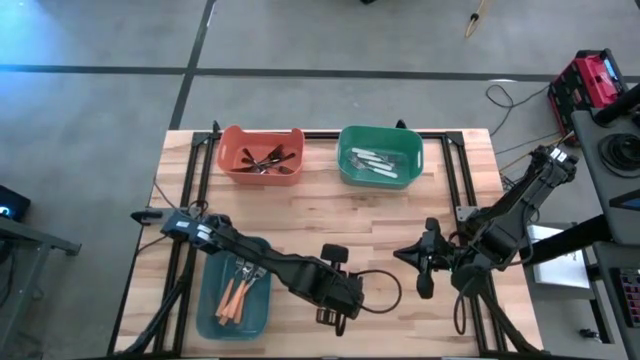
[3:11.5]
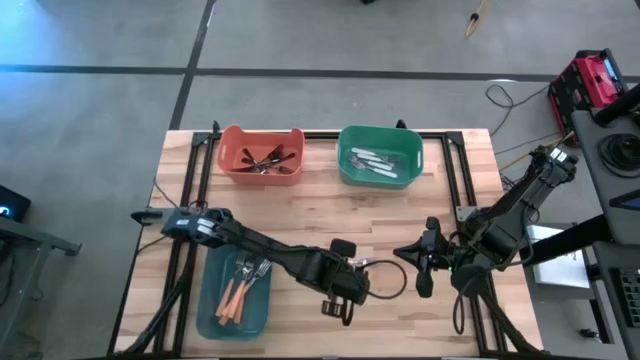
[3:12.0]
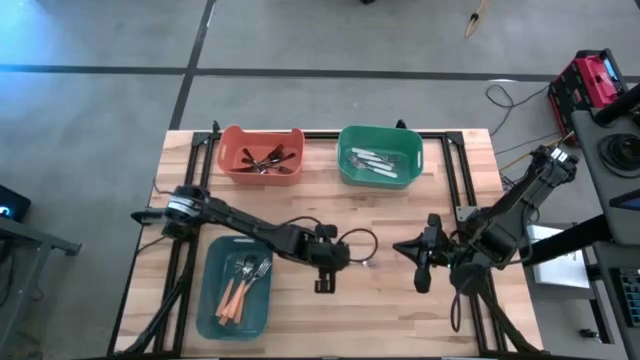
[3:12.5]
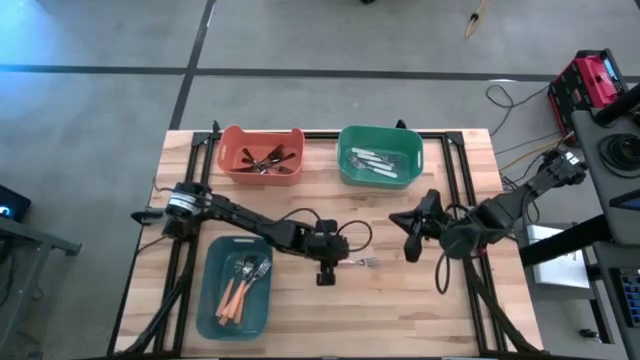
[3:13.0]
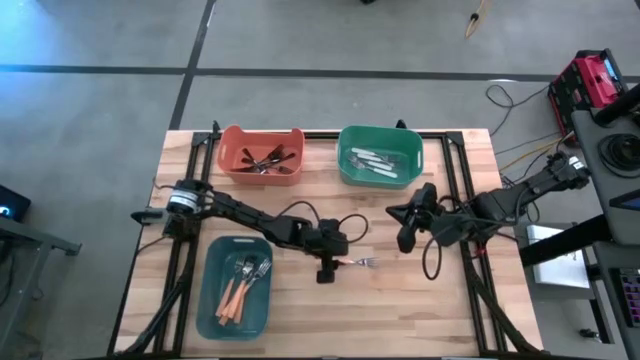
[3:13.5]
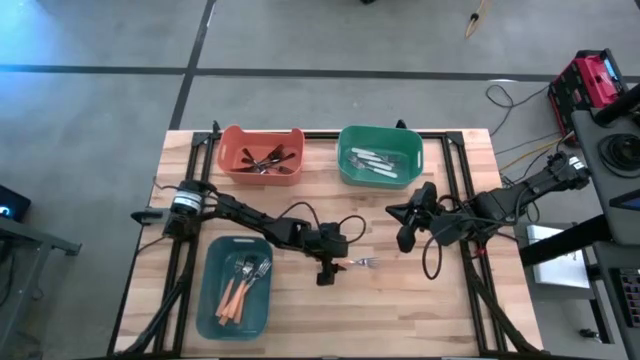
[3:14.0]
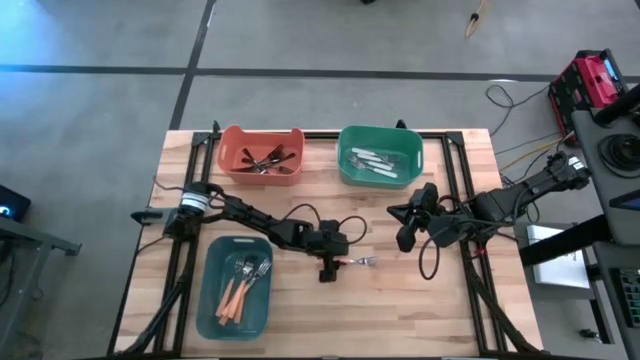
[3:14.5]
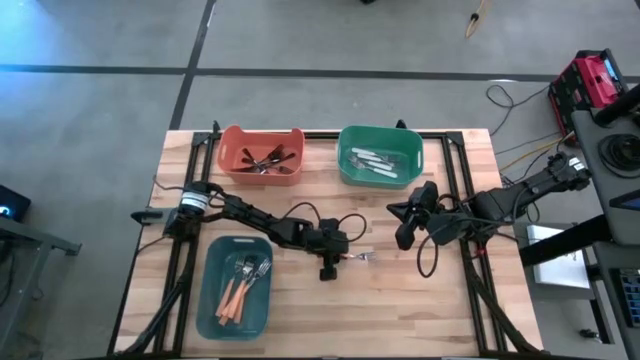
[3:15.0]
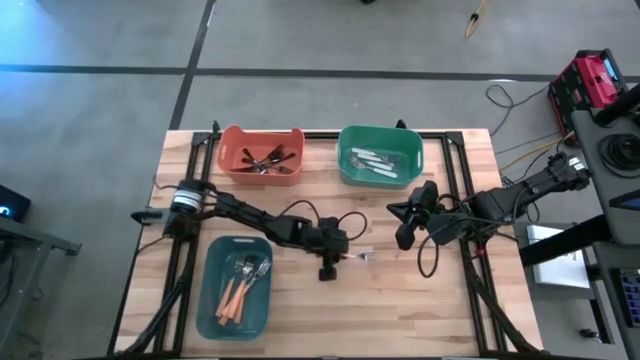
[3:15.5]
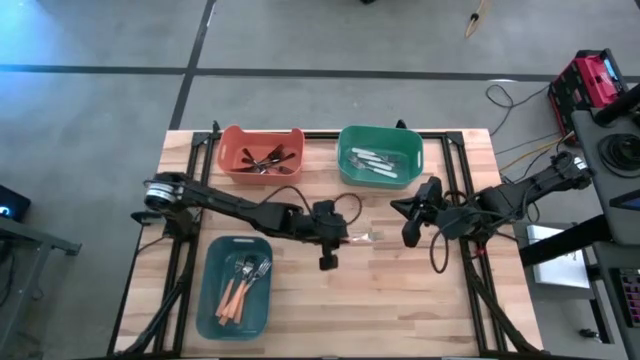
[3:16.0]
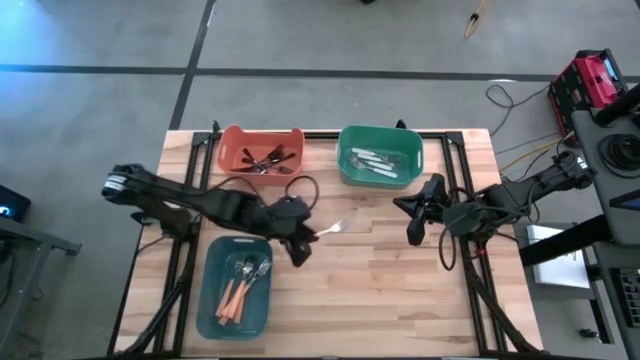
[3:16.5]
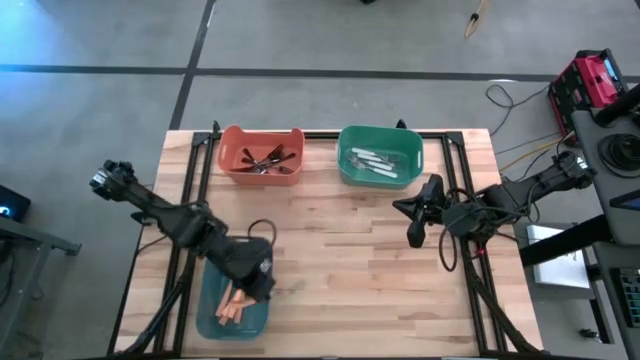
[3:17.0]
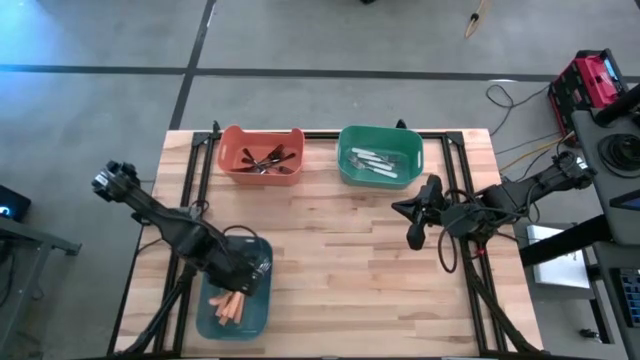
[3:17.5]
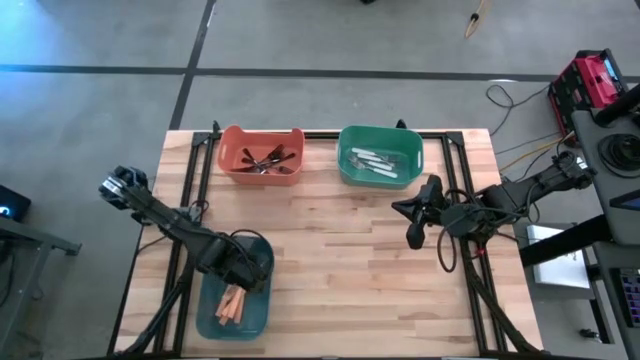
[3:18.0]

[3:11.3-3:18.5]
Task: Sort silverware by color (type)
Put the orange fork into the blue-green bin

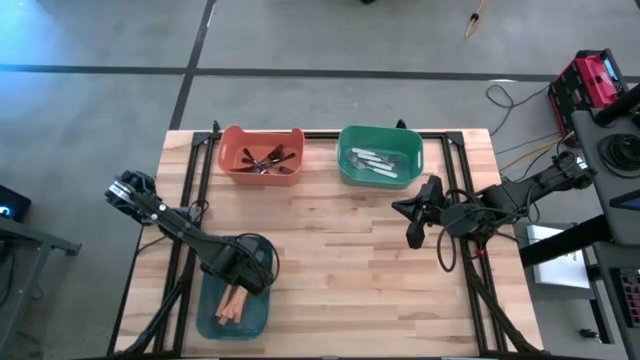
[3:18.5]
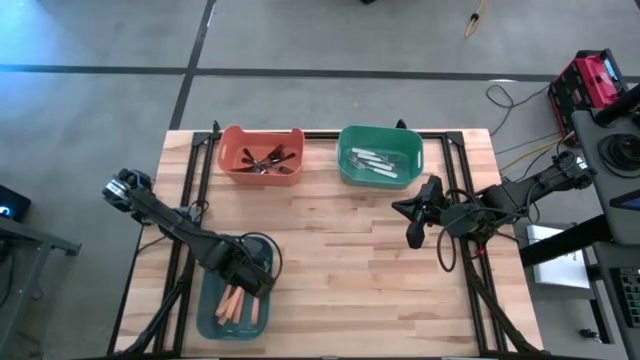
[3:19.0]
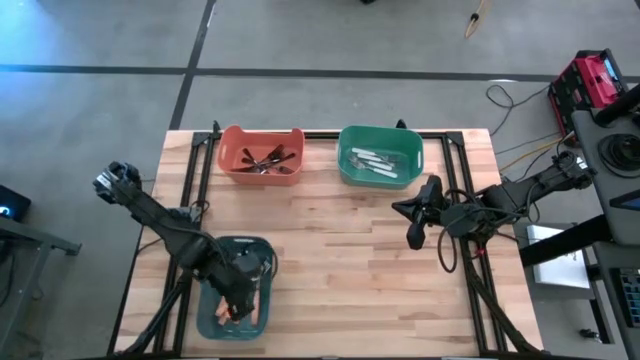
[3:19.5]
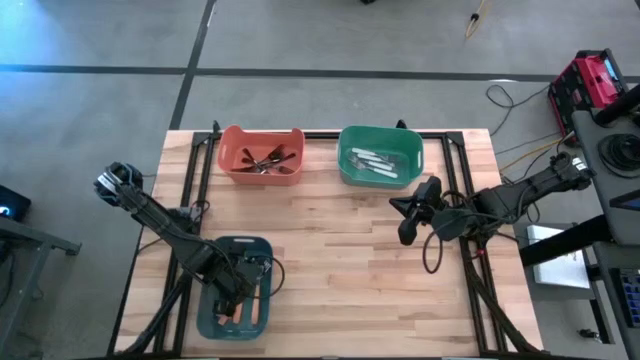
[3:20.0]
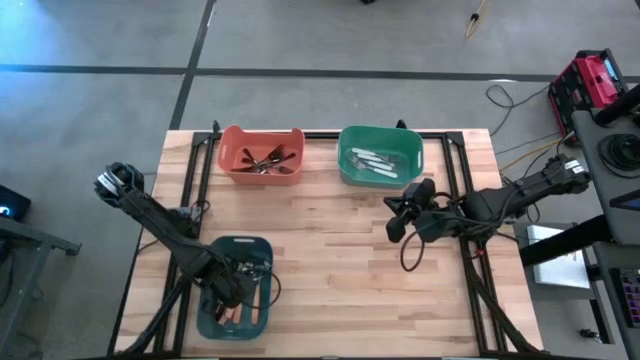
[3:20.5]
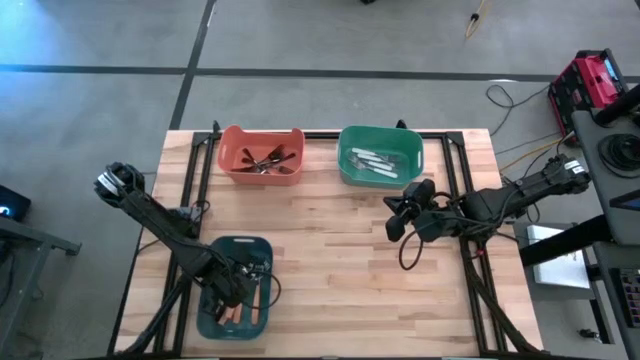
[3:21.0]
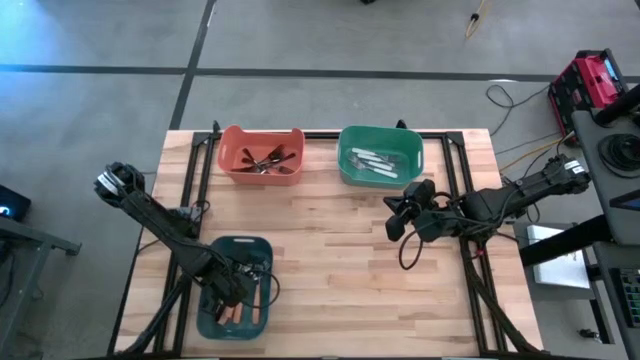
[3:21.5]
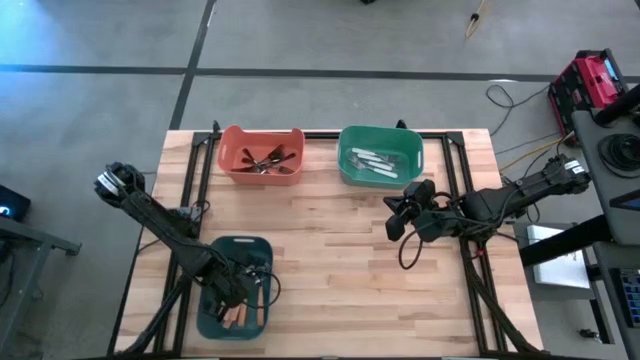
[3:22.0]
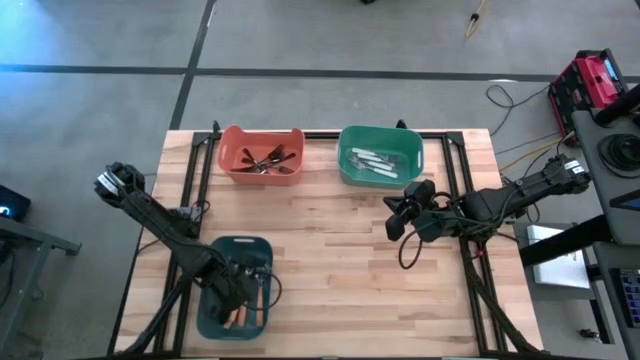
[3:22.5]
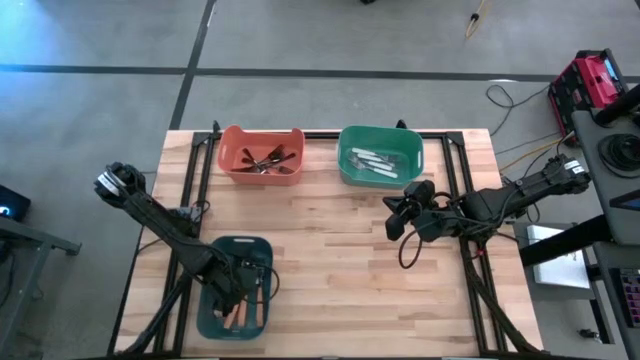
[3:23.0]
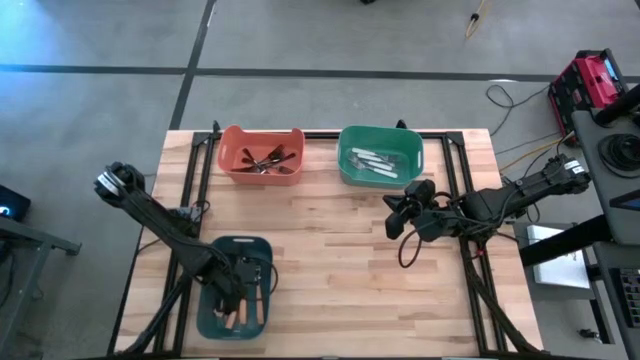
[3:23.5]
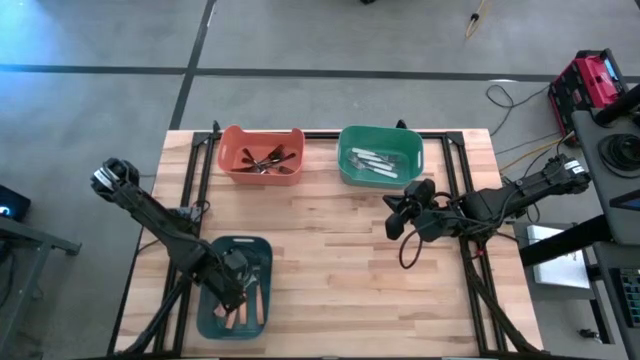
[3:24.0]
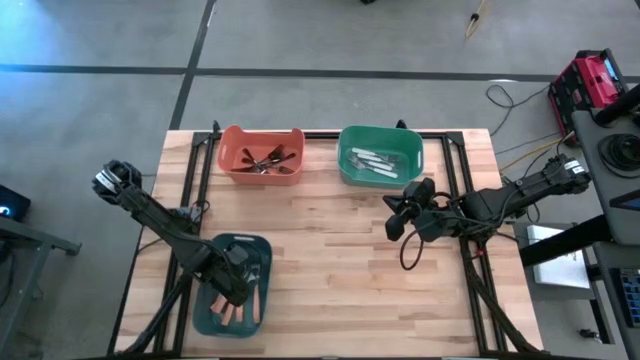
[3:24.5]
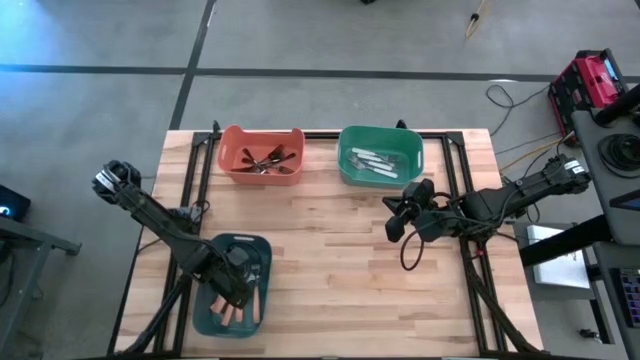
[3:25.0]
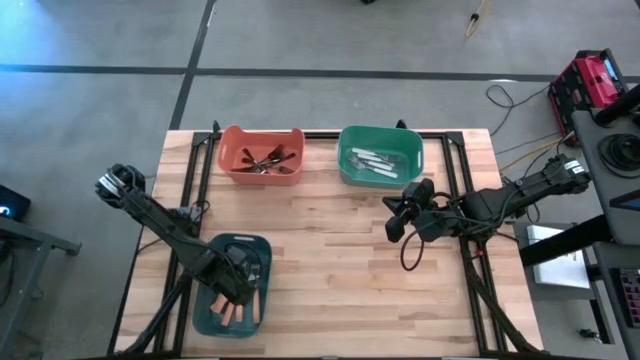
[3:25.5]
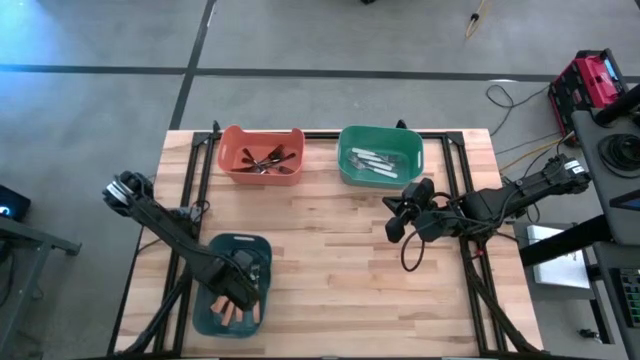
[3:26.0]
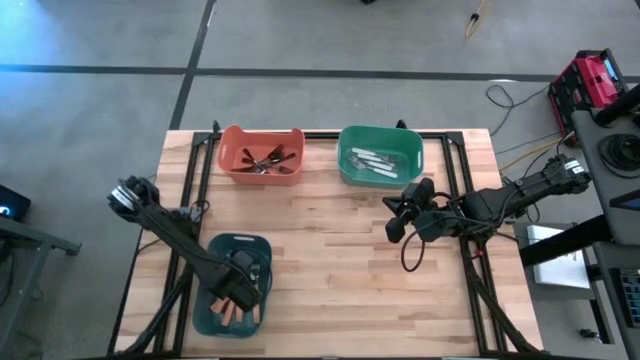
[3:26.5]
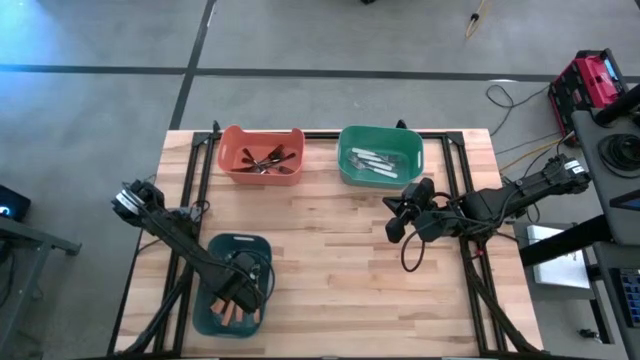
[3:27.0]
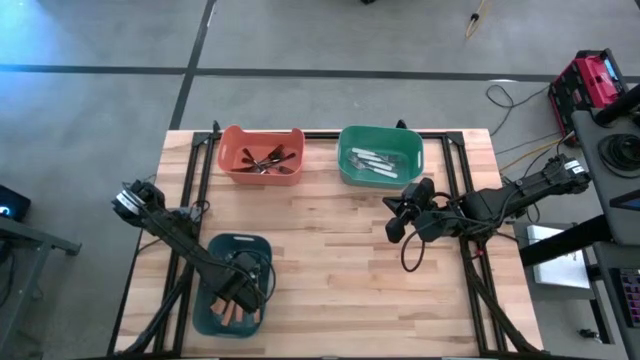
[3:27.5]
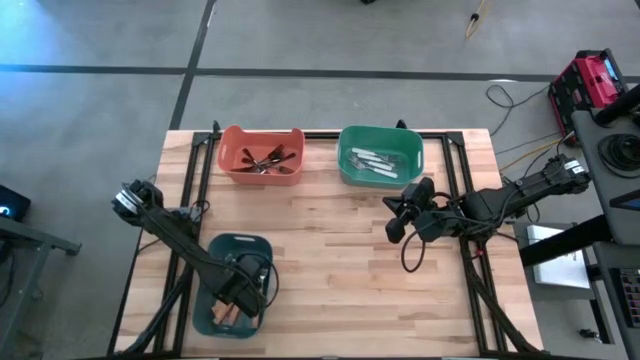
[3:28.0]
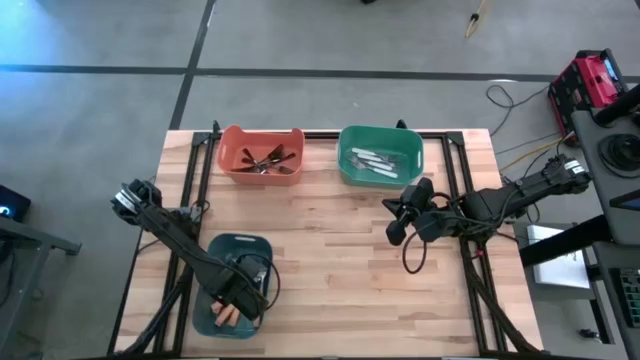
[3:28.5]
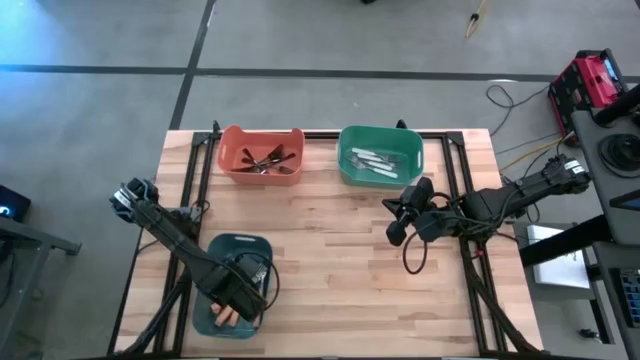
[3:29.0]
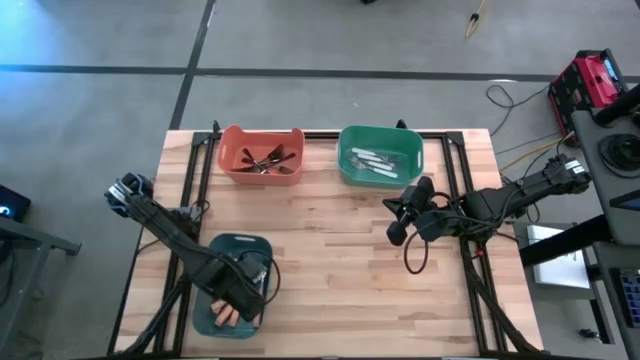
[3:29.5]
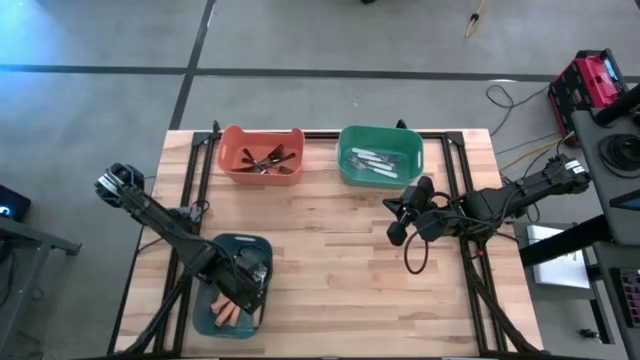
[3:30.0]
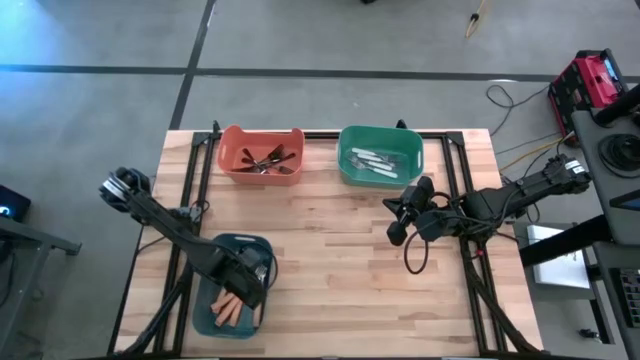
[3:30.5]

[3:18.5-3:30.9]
Adjust the orange forks in the blue-green bin

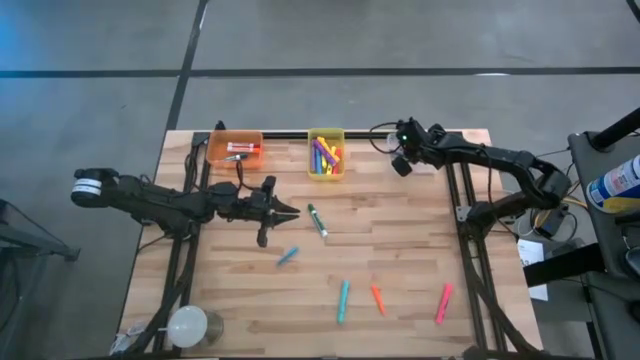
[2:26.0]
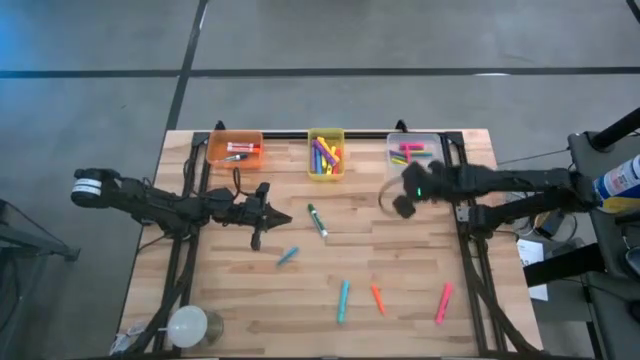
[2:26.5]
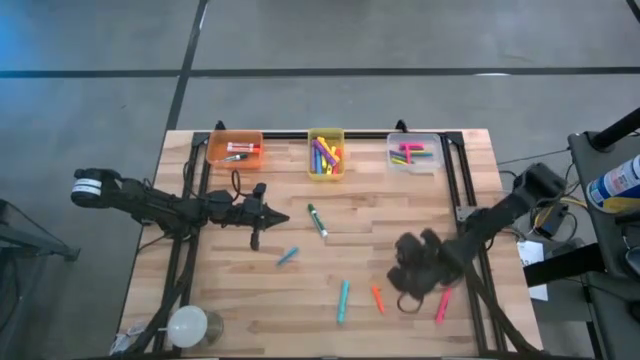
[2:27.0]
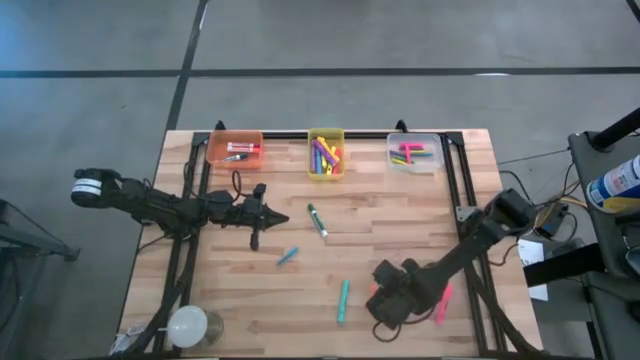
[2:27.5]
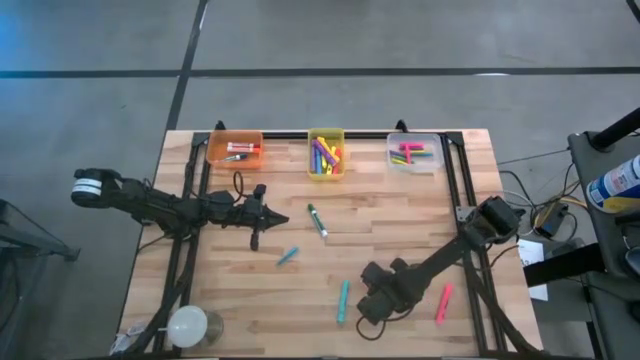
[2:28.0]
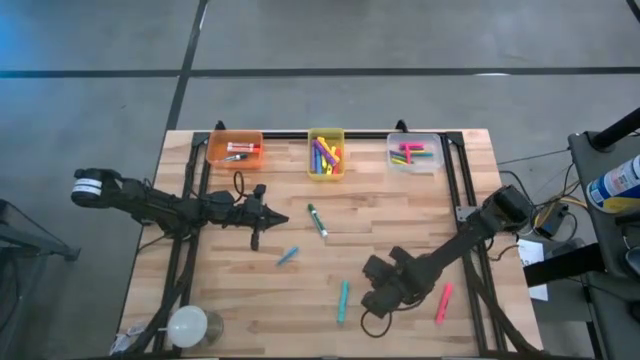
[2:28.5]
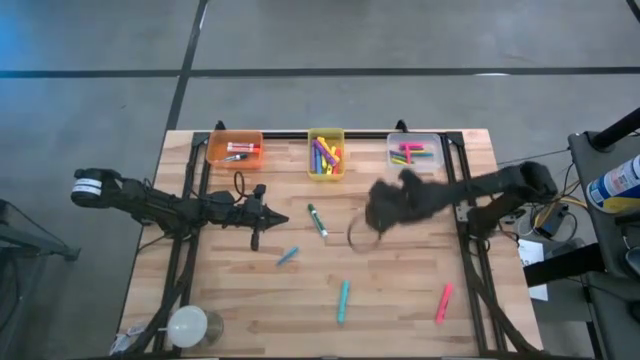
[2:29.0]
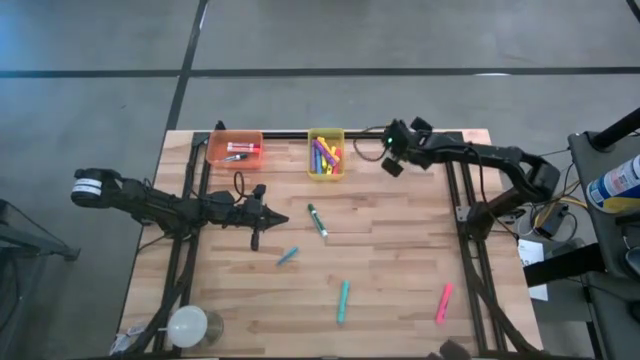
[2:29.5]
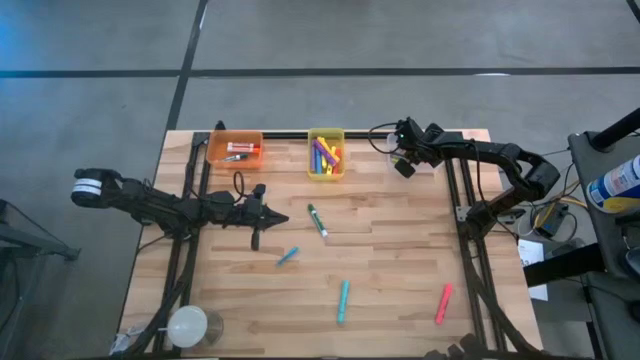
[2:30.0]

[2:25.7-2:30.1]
Task: Pick & Place Markers
Put the orange pen into the transparent bin
